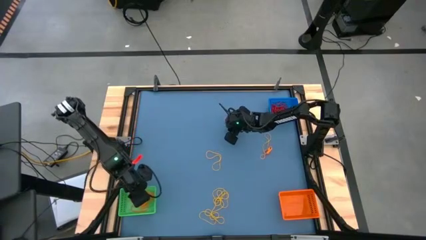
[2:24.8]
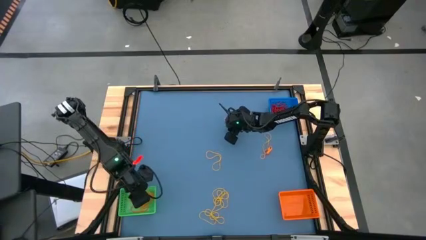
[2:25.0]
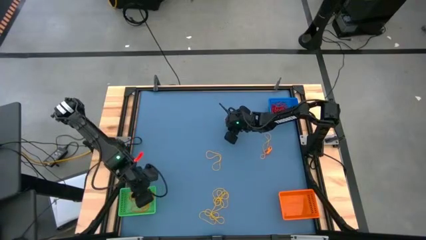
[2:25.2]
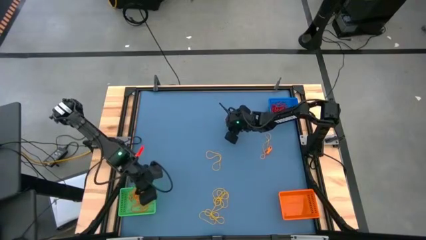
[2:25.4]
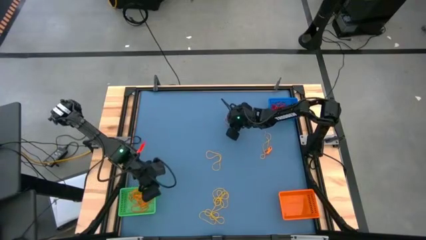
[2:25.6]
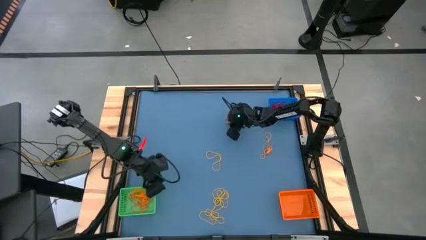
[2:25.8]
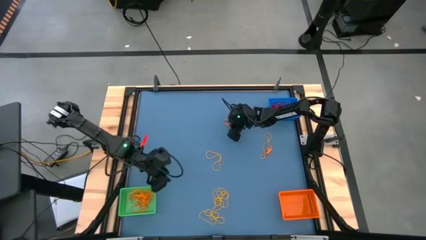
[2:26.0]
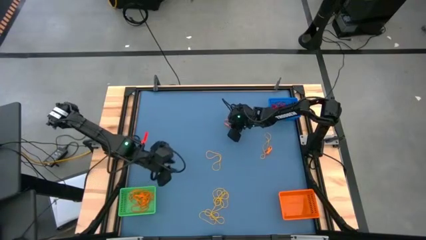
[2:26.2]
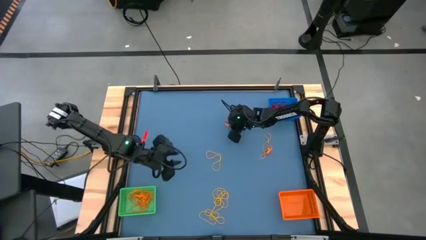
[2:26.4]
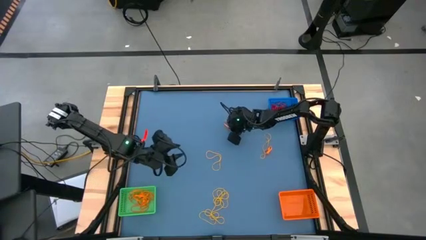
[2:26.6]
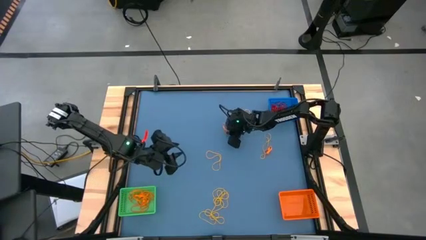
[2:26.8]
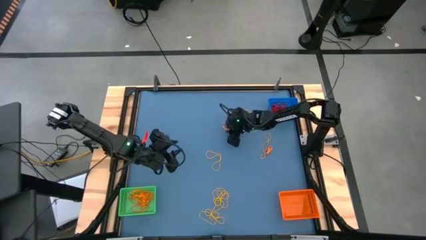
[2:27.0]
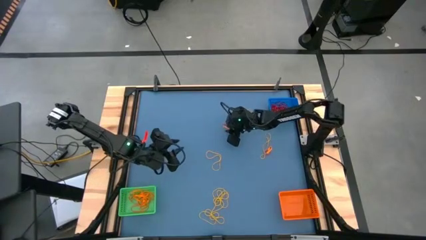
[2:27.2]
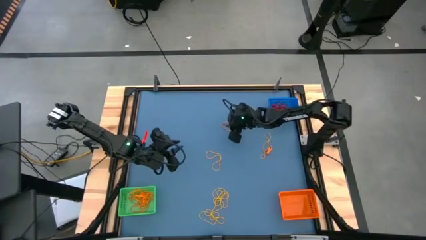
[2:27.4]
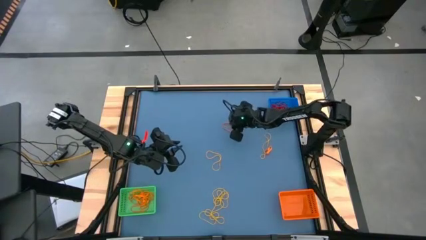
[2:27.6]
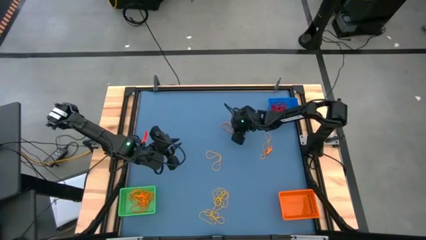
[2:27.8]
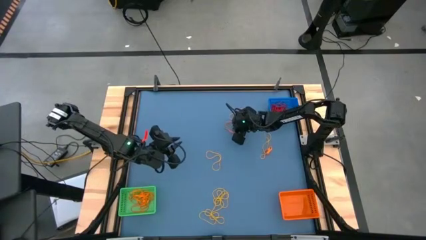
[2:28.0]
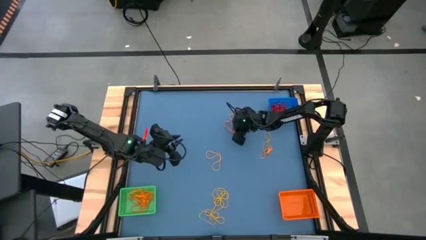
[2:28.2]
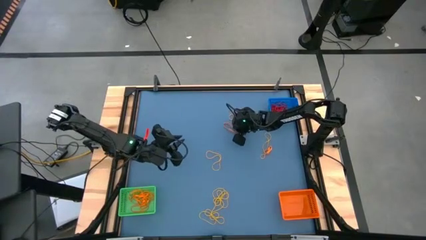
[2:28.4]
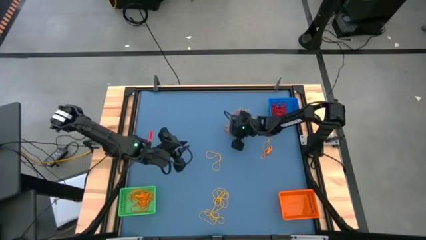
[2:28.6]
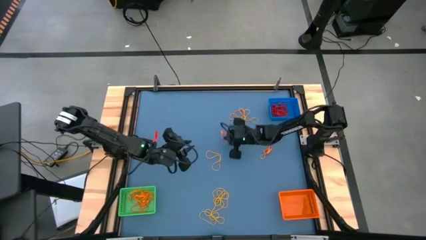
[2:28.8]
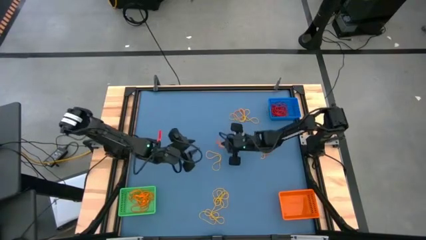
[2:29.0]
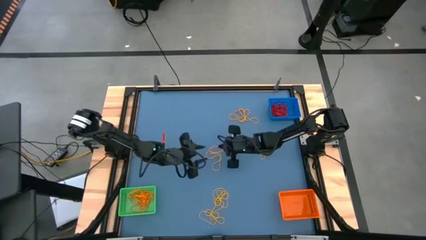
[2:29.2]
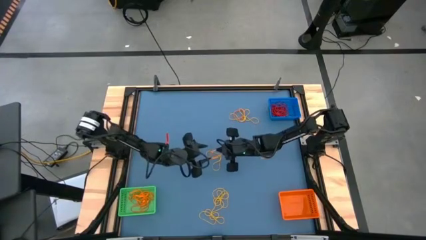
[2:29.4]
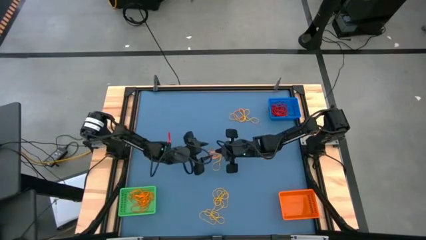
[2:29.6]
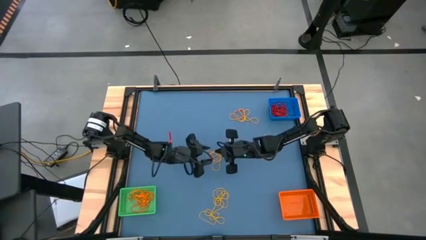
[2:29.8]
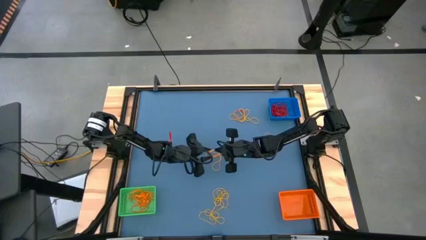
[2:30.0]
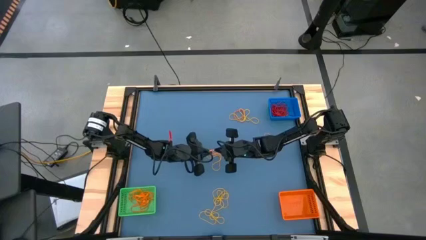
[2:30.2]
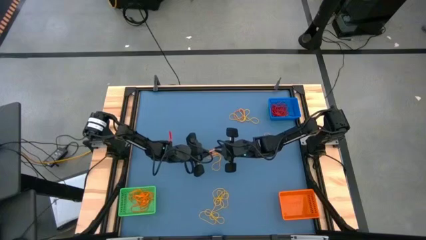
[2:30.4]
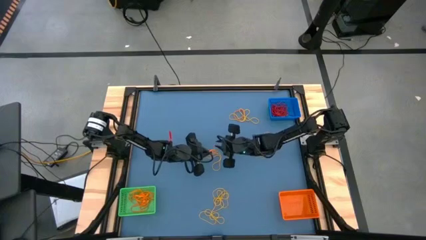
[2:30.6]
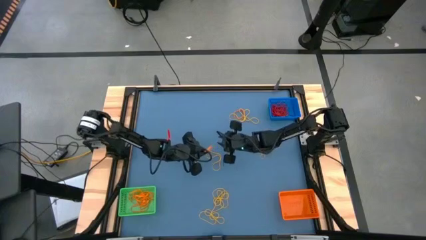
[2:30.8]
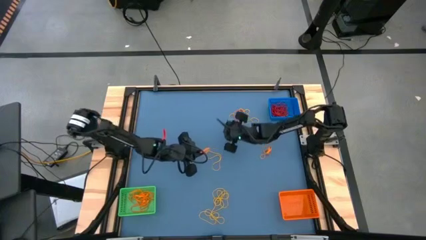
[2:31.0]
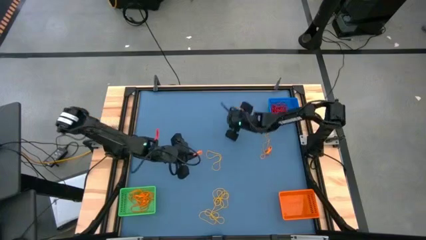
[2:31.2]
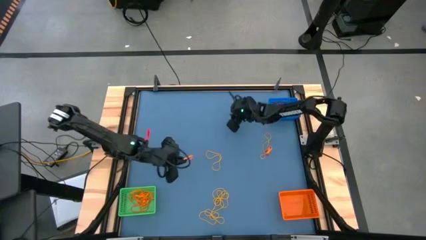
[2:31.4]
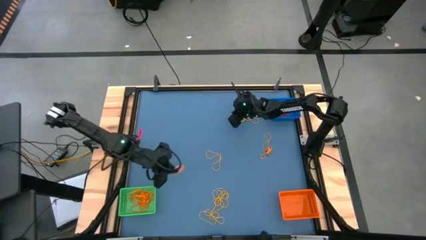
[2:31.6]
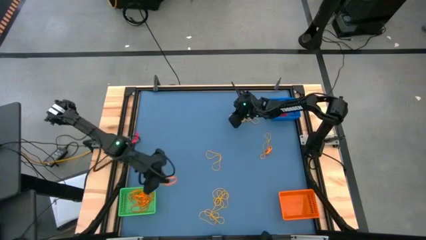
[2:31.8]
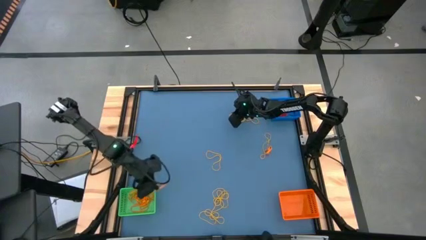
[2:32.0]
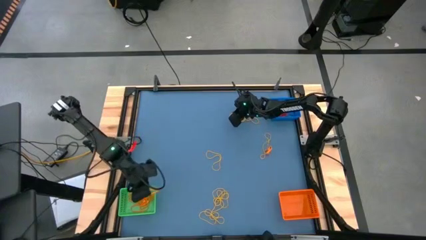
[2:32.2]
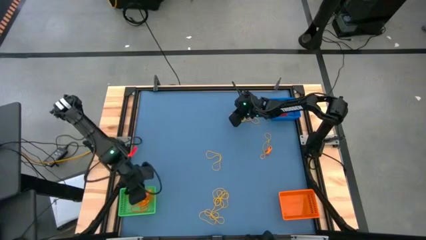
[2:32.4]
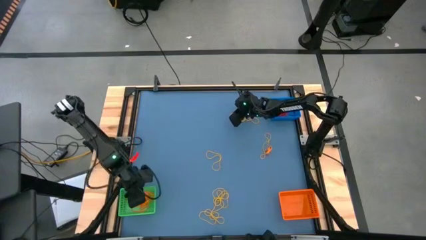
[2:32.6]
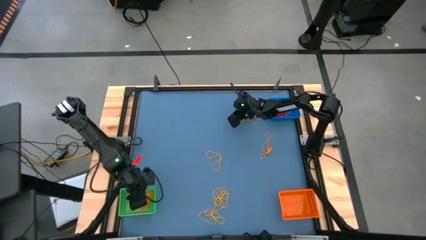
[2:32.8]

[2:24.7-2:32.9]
Task: Sort rubber bands into baskets
Put the orange rubber band into the green bin

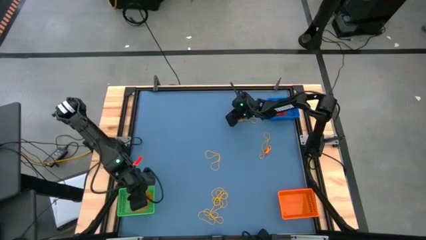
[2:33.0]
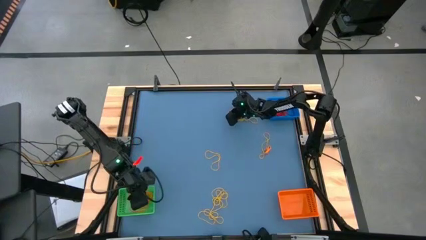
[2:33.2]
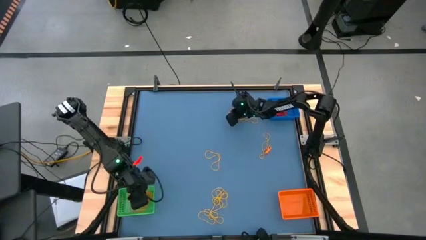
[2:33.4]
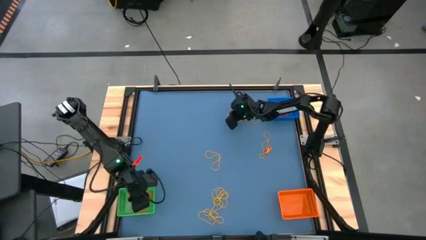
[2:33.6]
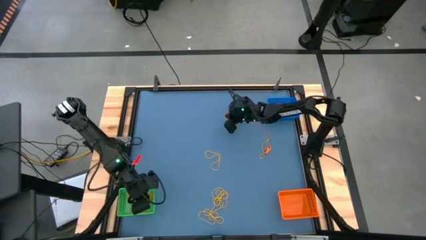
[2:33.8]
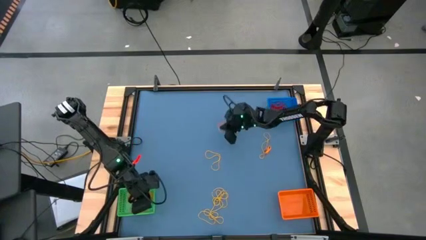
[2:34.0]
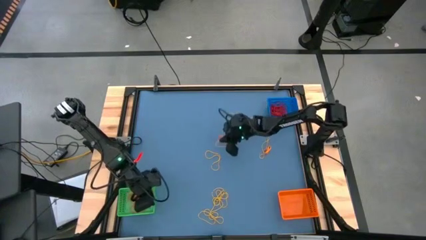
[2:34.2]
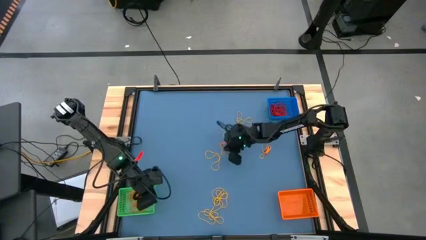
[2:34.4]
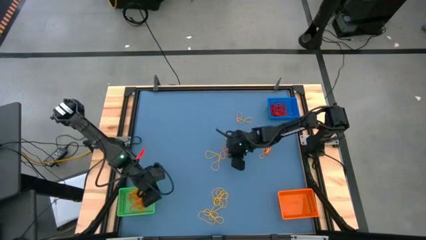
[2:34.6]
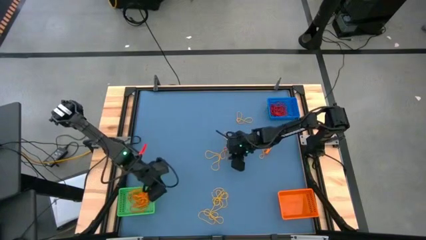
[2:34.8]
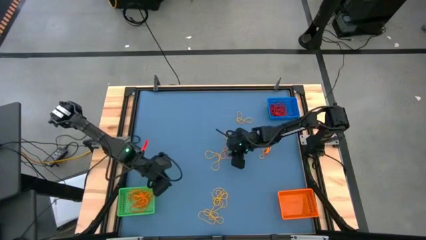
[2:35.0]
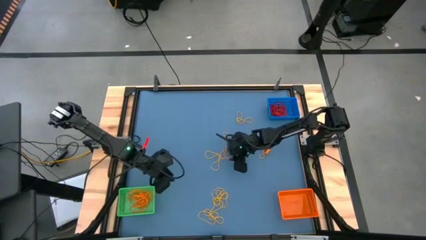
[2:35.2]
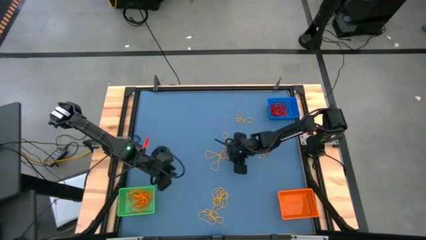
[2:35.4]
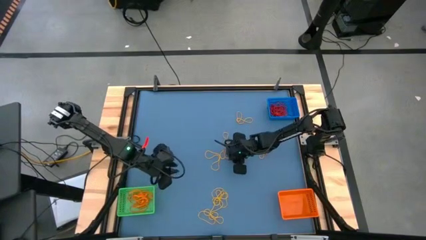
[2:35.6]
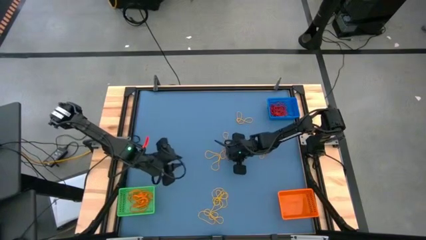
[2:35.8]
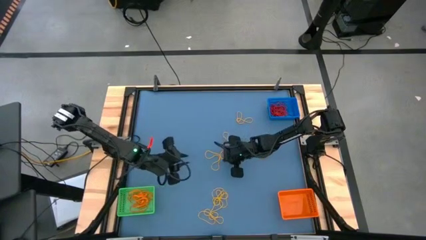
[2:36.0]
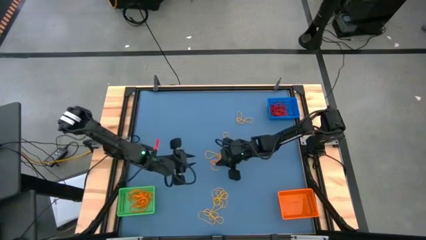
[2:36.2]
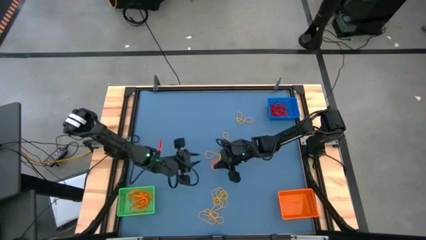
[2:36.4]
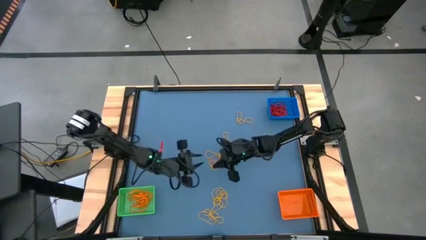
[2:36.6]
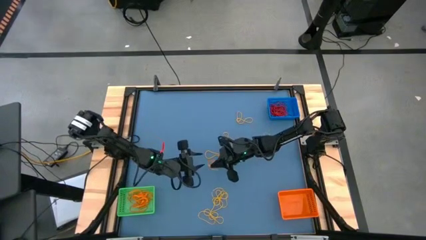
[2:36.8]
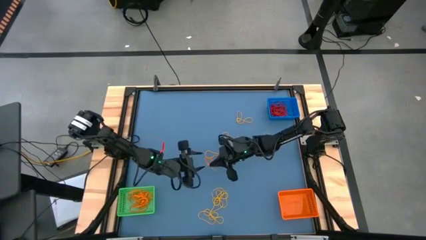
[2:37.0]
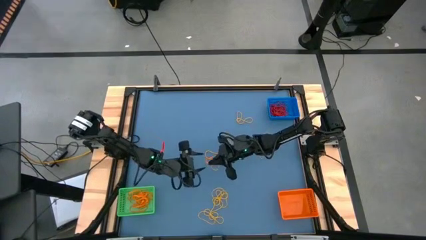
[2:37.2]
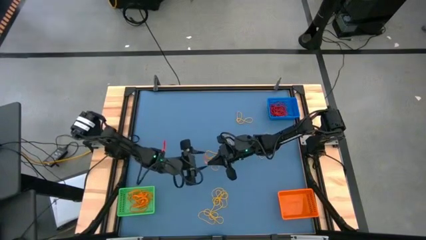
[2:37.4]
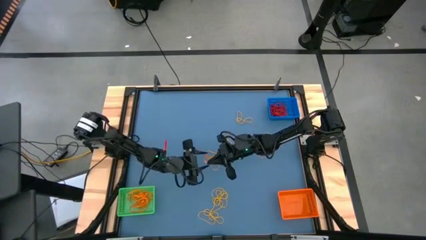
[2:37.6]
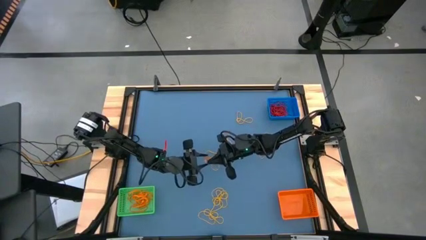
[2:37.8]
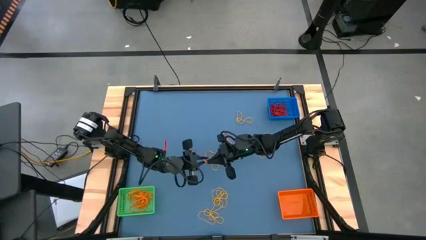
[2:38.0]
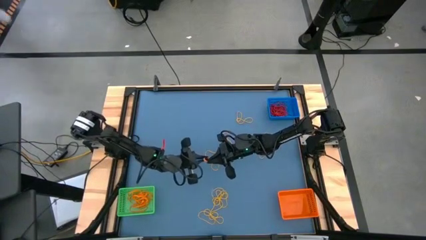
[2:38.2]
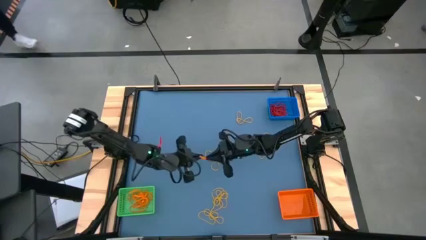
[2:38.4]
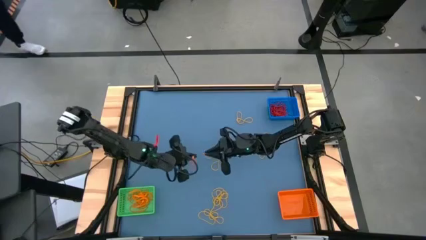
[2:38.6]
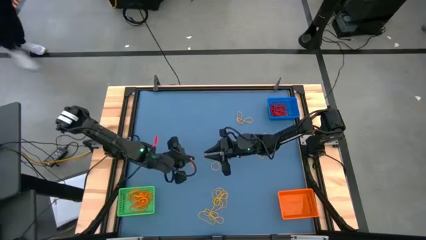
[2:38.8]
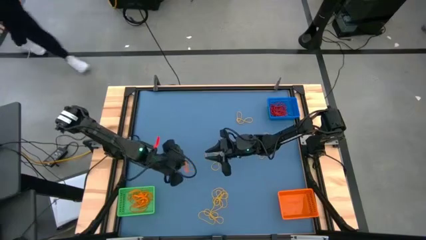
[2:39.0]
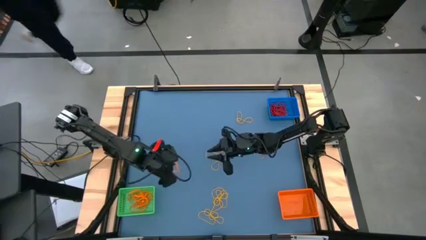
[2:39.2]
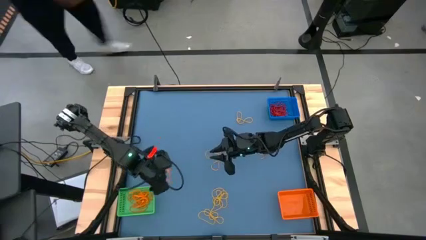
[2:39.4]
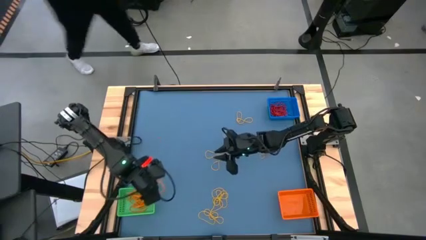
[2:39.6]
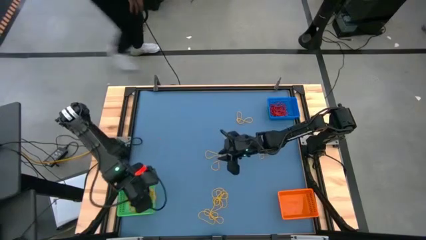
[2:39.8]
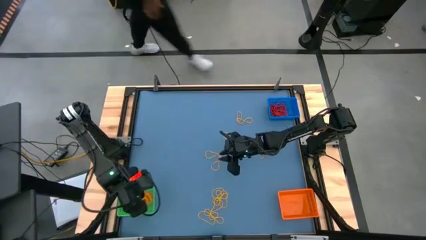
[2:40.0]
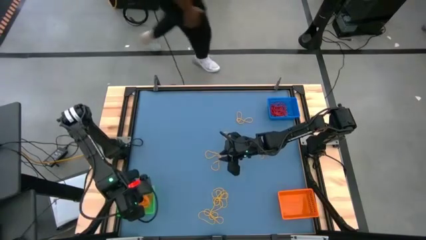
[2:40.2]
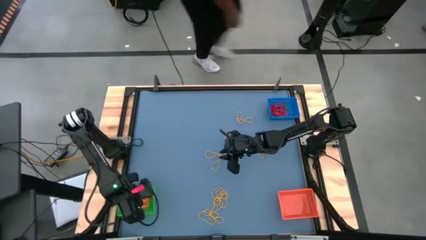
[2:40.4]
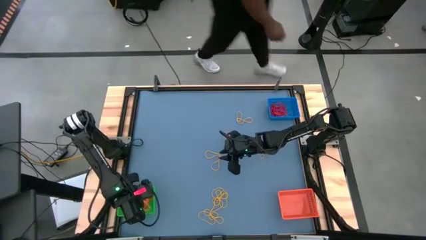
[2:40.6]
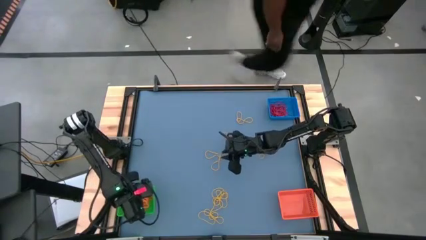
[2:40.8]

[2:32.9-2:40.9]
Put the orange rubber band into the green bin
